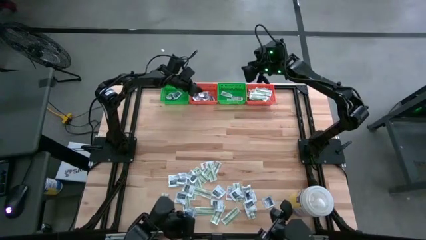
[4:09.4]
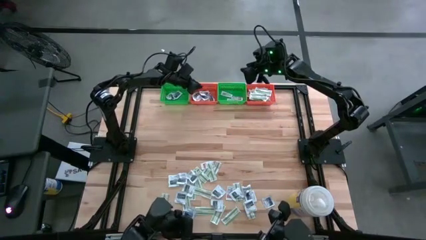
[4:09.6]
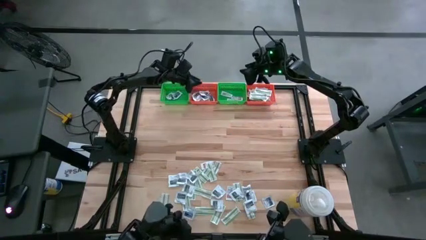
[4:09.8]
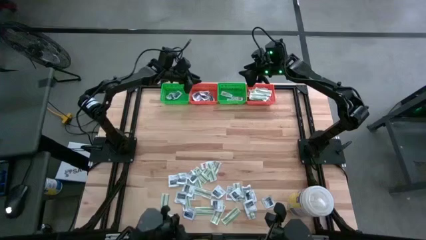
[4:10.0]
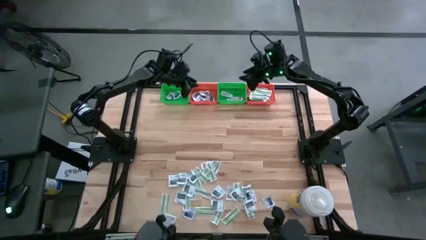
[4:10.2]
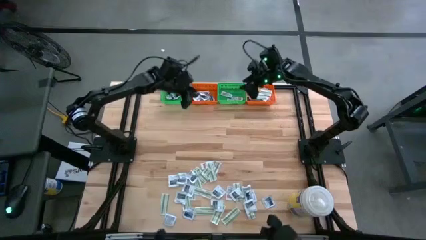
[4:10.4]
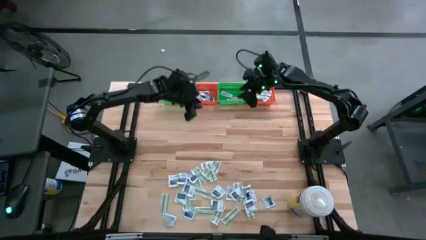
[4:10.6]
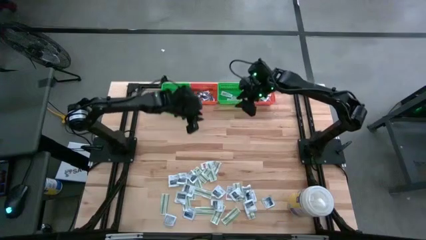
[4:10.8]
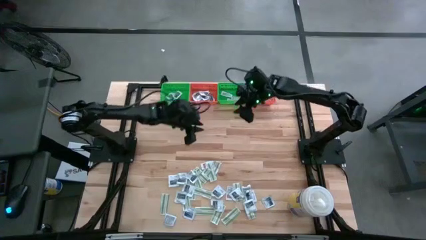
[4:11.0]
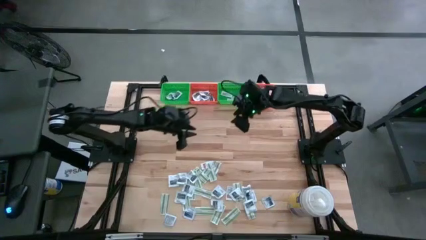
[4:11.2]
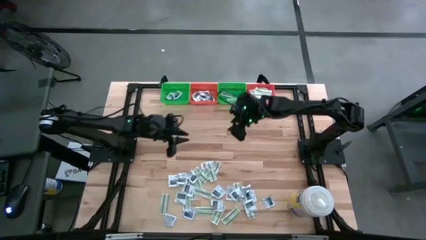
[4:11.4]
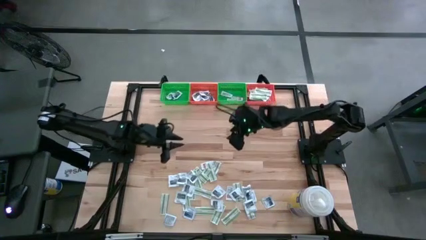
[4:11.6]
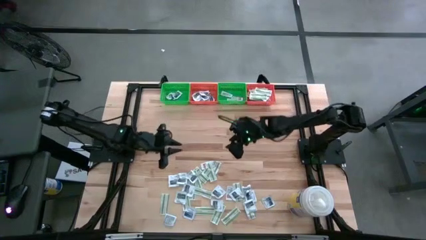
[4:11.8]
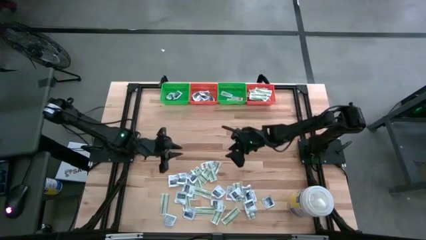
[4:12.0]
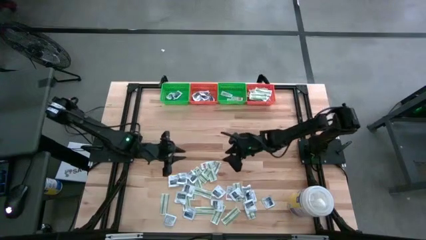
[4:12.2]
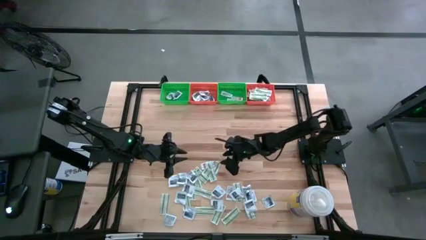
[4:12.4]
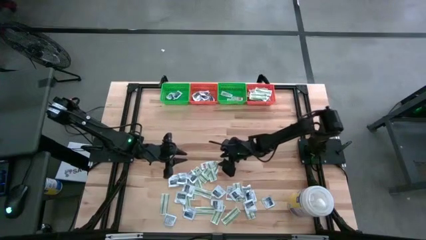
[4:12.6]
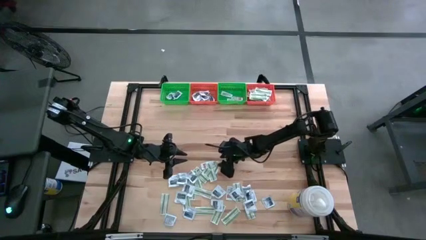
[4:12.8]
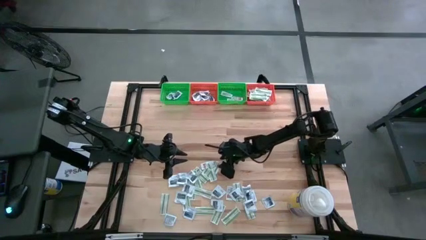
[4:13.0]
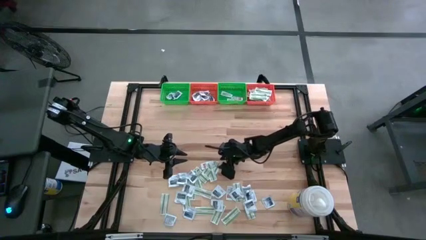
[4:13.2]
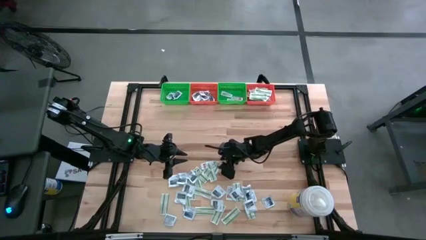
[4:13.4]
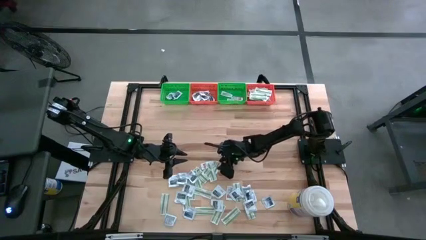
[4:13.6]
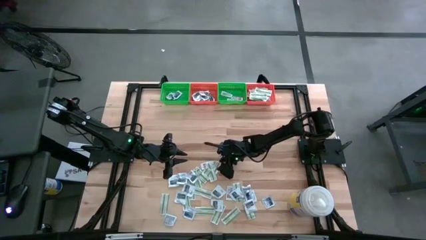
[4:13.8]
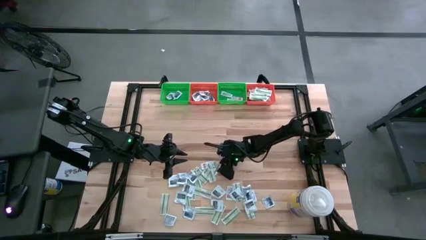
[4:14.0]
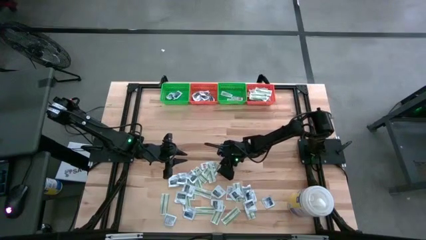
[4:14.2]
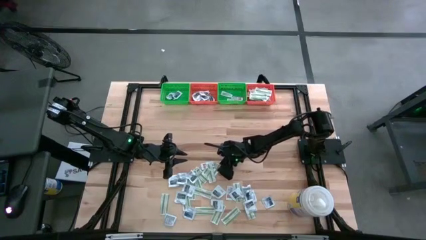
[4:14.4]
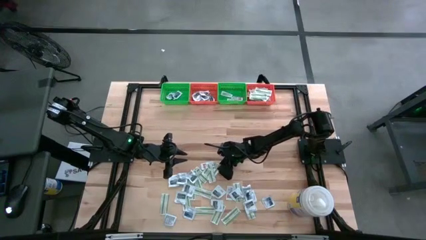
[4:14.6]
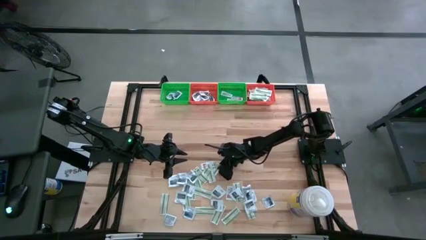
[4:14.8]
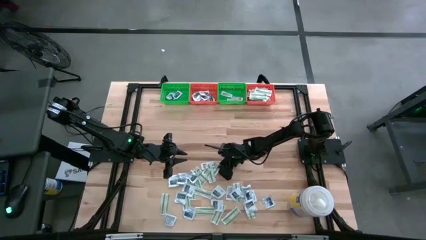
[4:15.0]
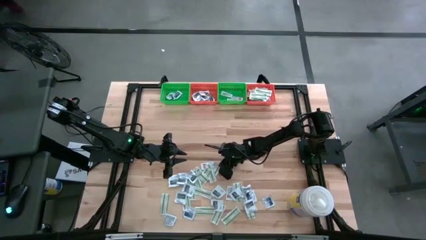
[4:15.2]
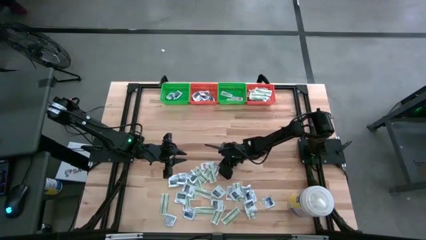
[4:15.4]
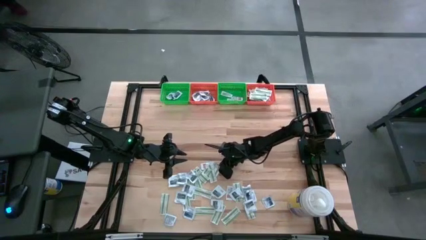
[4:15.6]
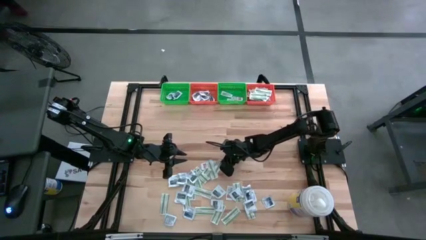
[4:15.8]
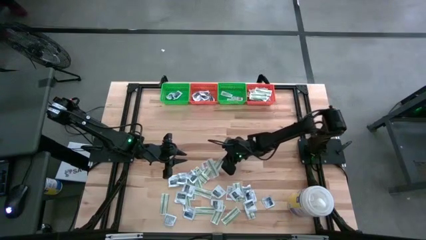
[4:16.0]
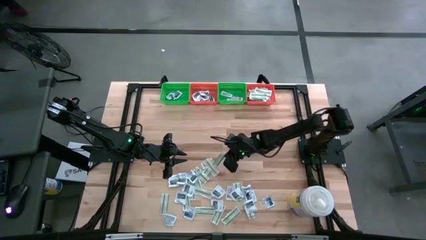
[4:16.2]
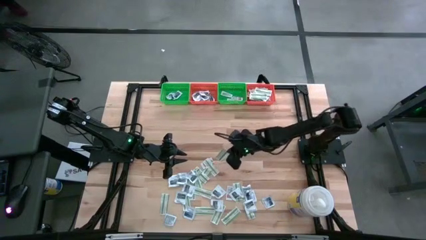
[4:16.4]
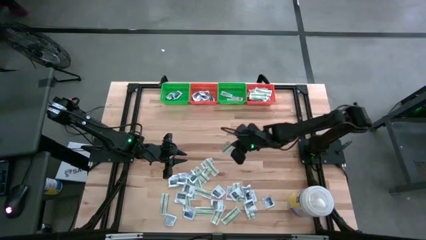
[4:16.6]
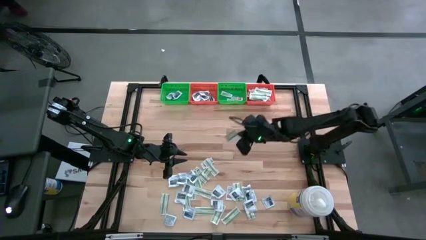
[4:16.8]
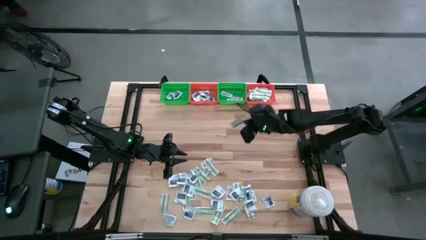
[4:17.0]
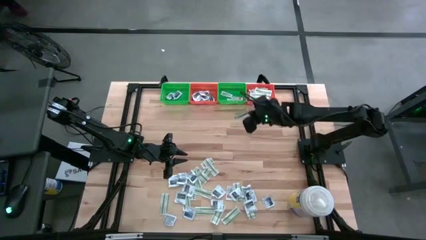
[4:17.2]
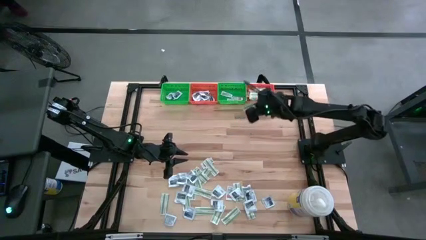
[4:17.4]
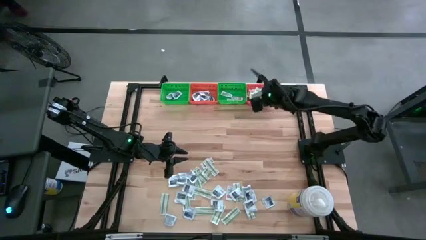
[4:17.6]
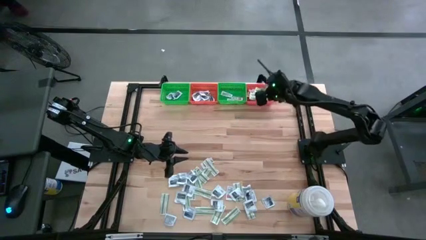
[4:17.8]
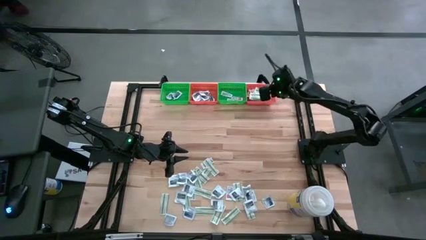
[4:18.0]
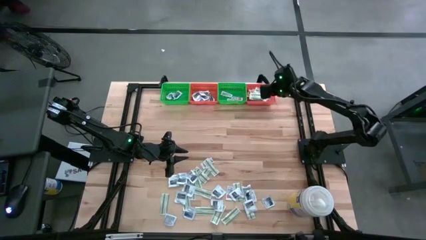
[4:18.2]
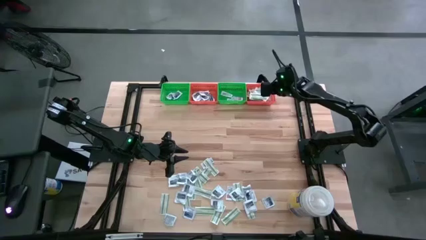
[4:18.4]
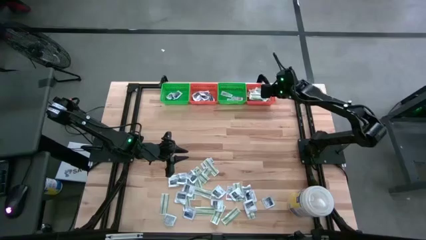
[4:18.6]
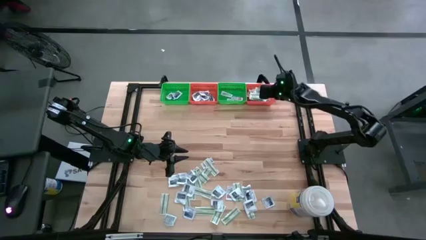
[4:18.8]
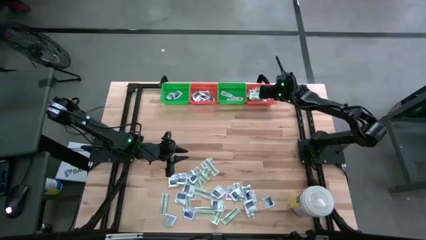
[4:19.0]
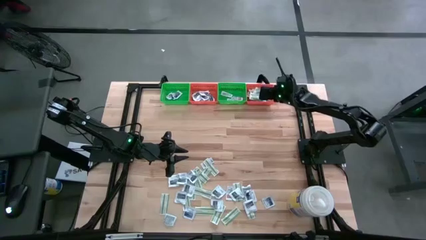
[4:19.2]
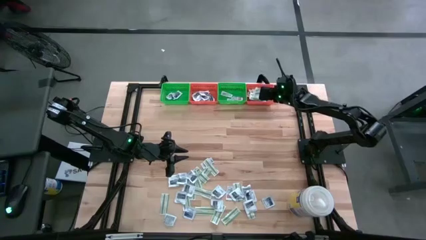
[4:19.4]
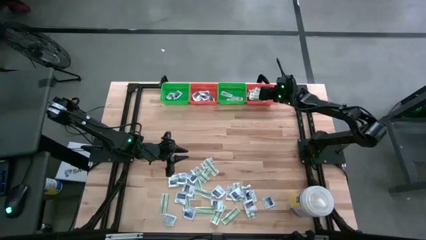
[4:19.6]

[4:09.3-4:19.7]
Task: Pick & Place First Aid Supplies
Put the green bandage pack in the right orange bin

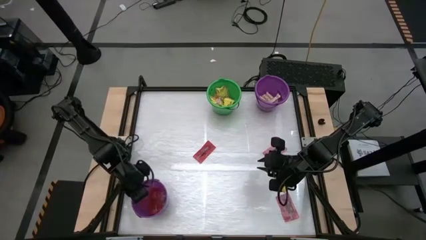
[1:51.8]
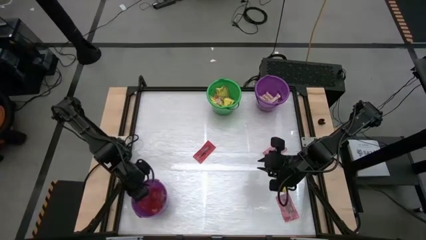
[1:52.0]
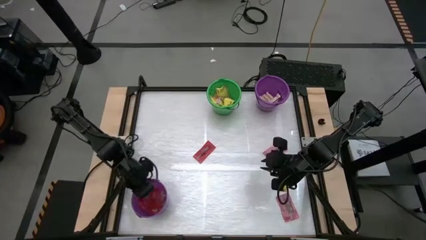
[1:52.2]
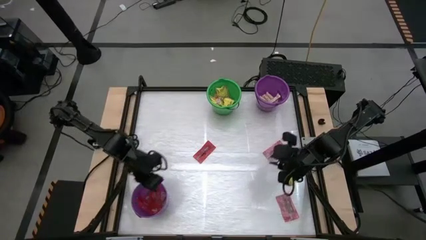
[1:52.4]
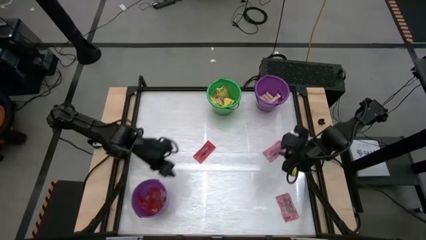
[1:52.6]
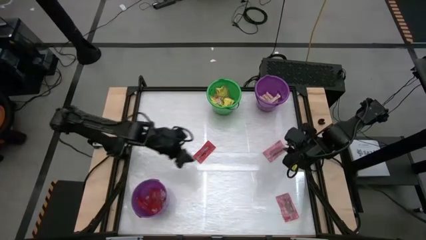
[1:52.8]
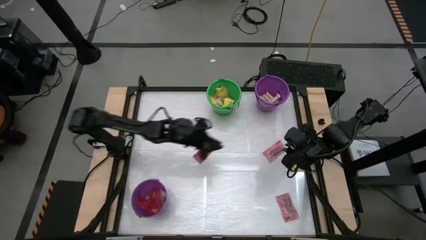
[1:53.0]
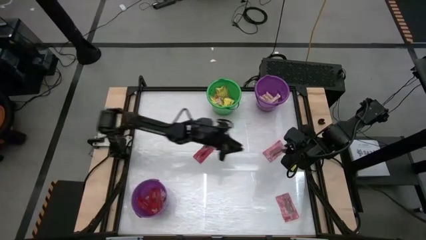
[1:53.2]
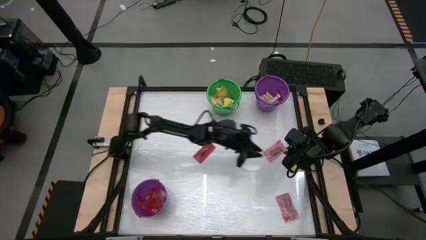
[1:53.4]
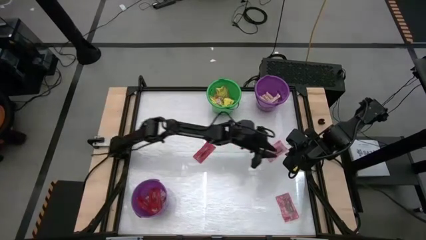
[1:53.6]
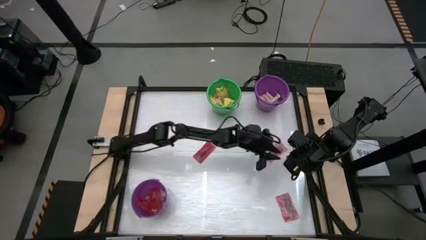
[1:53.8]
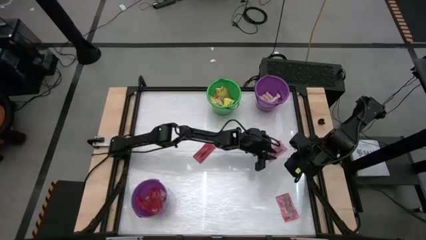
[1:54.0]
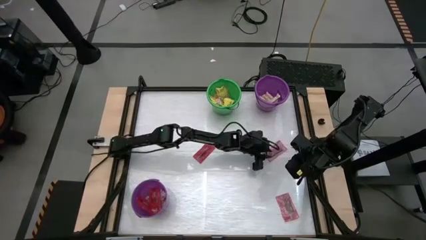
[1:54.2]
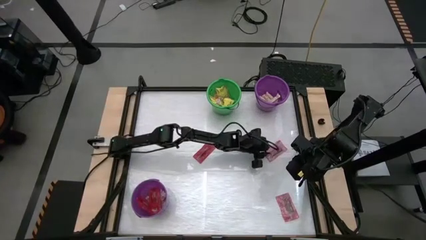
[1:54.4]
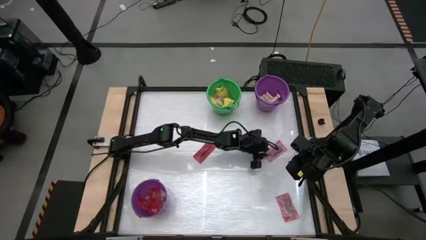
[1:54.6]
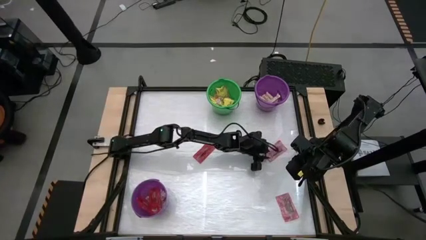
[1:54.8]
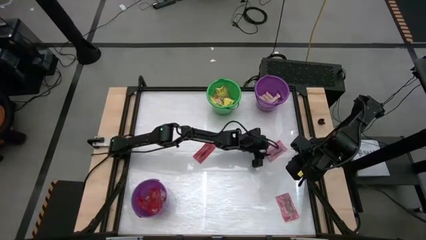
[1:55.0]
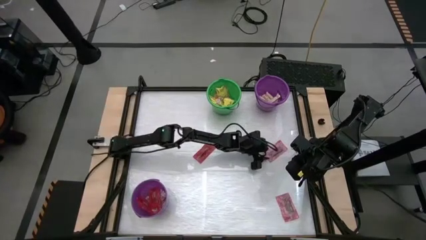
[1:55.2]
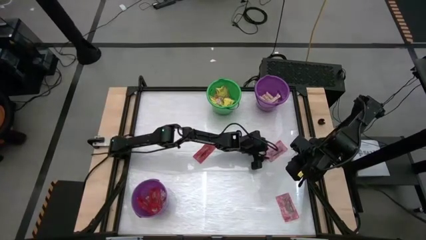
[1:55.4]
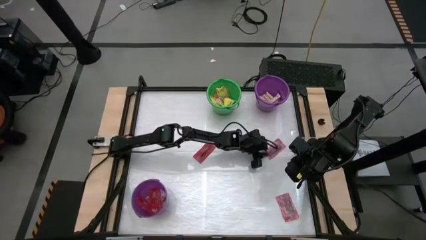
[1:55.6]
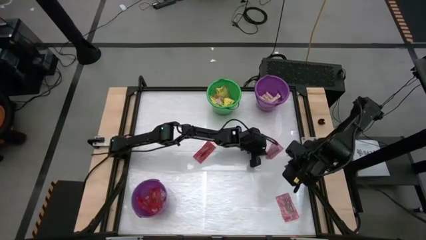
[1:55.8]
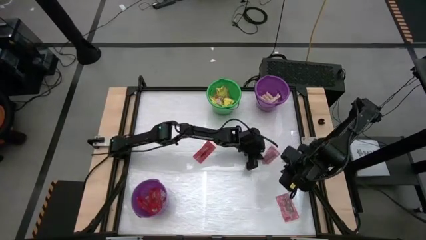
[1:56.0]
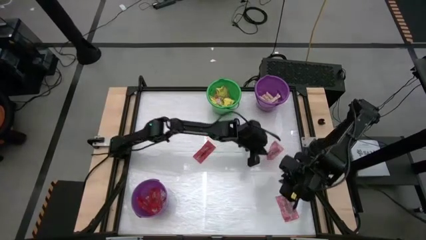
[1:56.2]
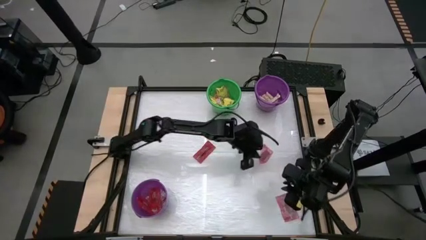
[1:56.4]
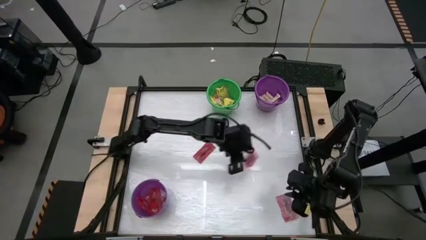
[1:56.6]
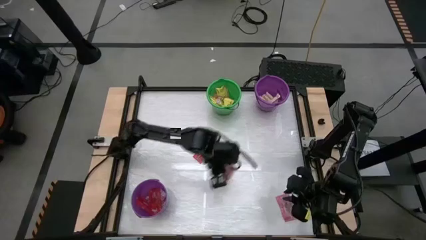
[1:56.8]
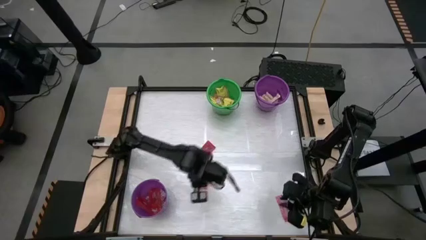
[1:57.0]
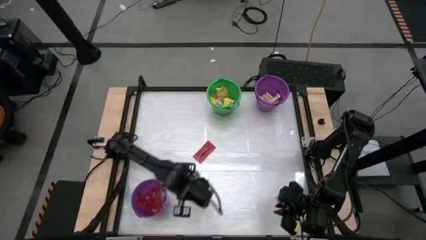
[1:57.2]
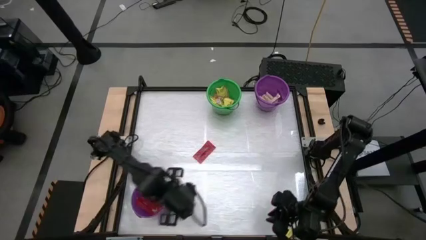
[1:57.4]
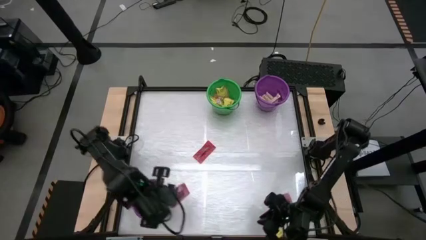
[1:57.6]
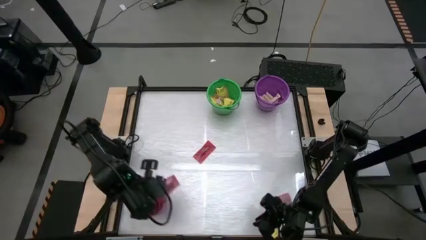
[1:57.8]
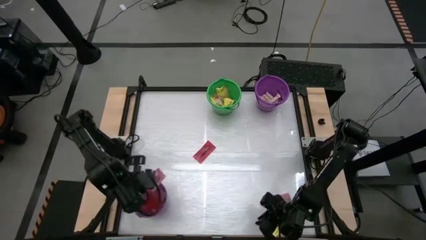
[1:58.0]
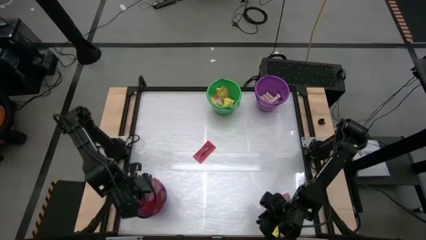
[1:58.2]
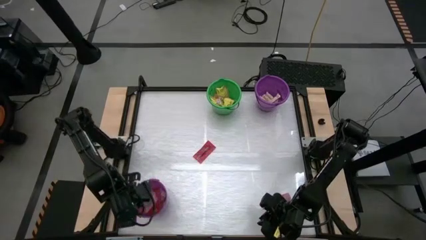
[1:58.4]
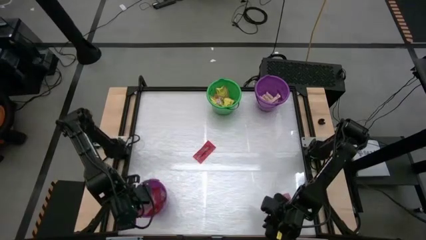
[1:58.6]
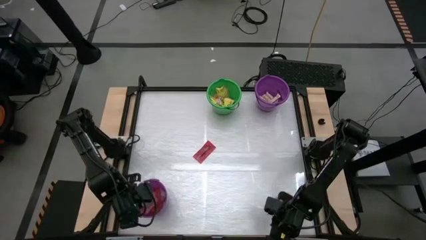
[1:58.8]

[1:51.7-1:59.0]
Task: Sort candy by brand, put in halloween buckets
Put the red candy into the bottom violet bucket
